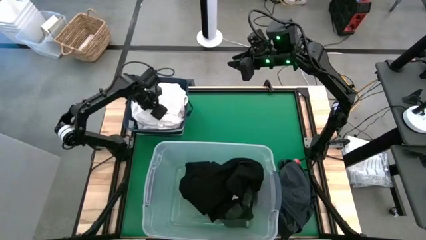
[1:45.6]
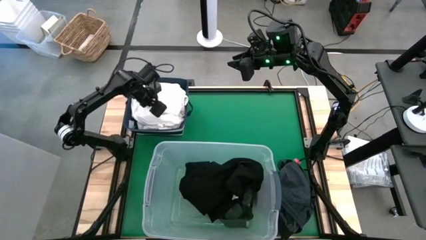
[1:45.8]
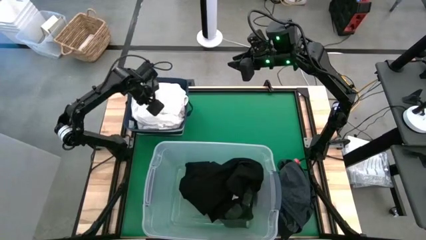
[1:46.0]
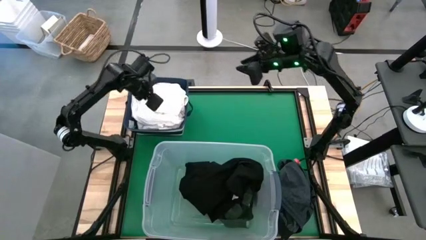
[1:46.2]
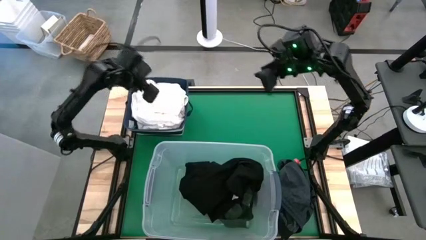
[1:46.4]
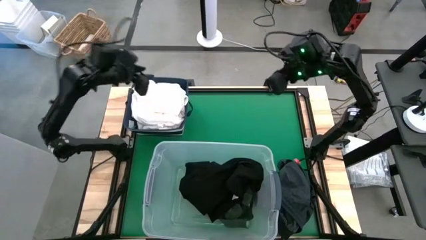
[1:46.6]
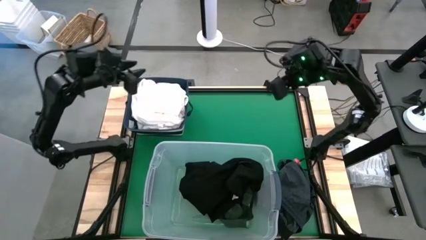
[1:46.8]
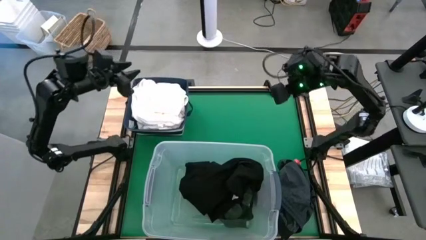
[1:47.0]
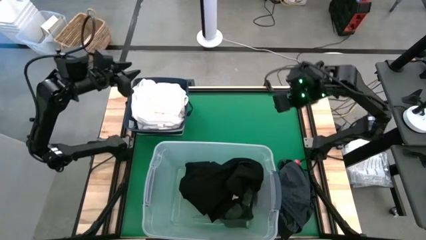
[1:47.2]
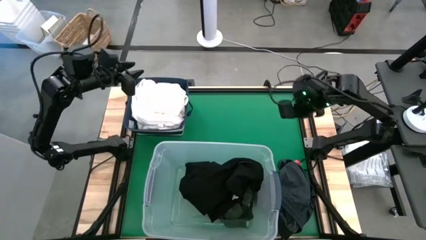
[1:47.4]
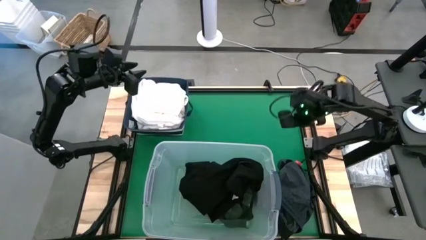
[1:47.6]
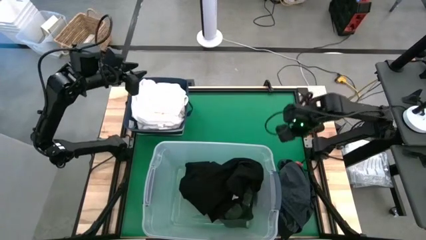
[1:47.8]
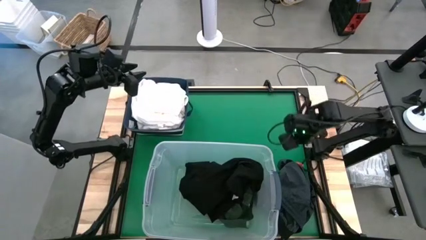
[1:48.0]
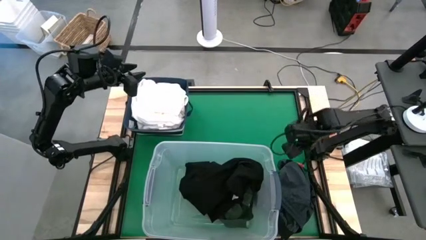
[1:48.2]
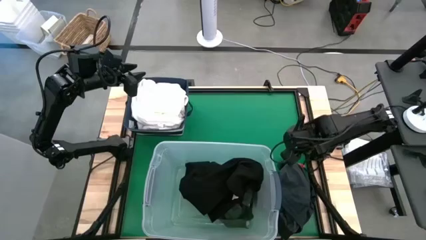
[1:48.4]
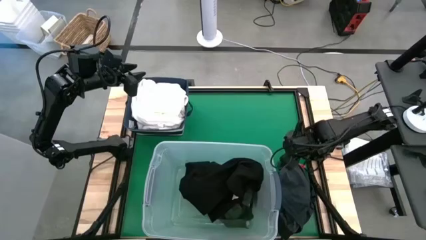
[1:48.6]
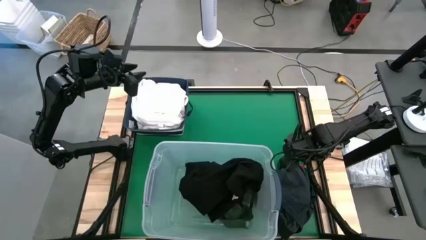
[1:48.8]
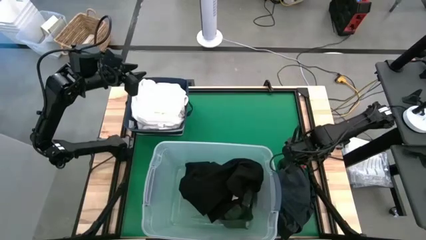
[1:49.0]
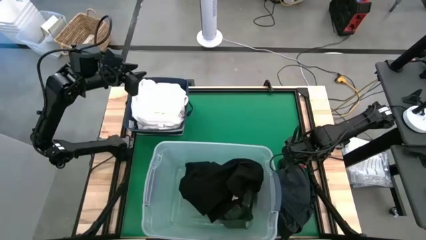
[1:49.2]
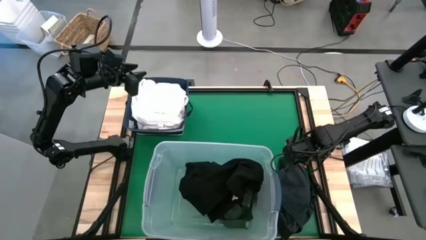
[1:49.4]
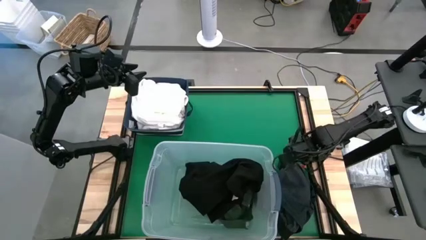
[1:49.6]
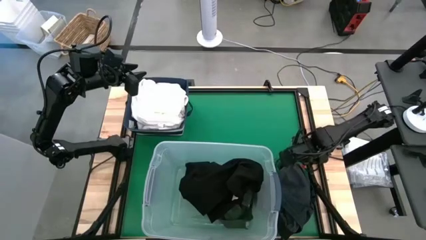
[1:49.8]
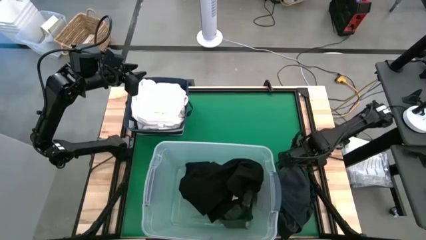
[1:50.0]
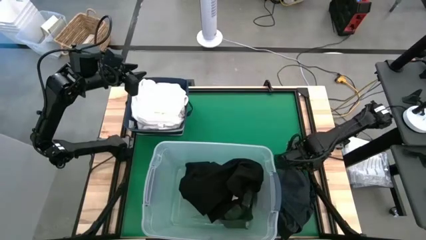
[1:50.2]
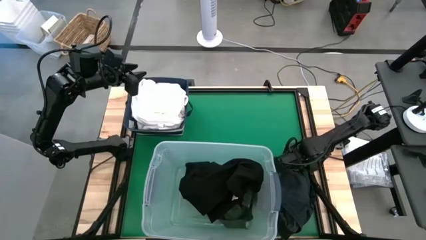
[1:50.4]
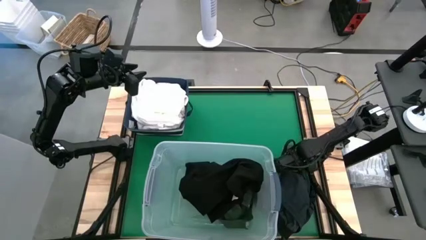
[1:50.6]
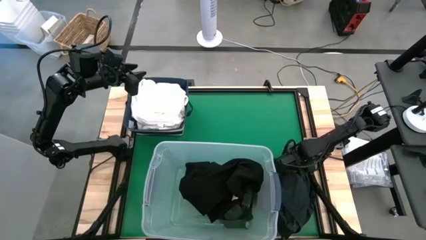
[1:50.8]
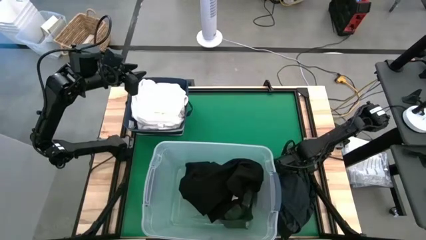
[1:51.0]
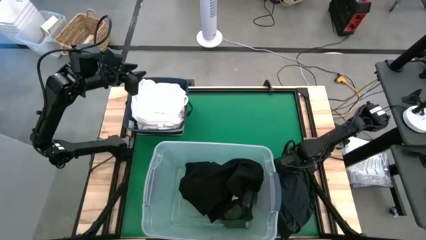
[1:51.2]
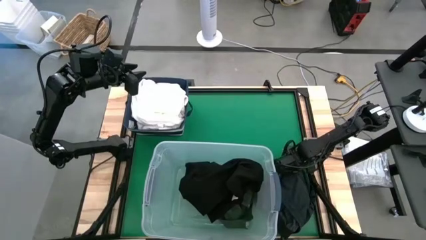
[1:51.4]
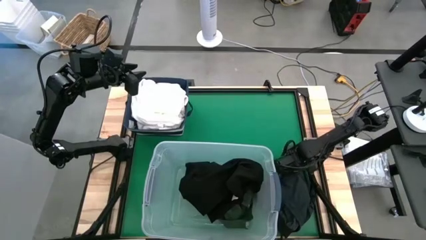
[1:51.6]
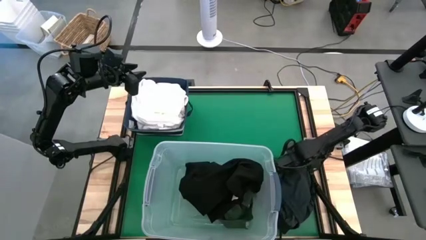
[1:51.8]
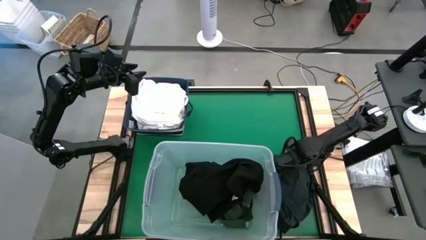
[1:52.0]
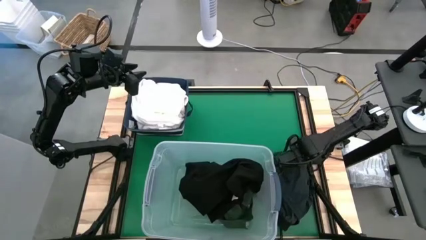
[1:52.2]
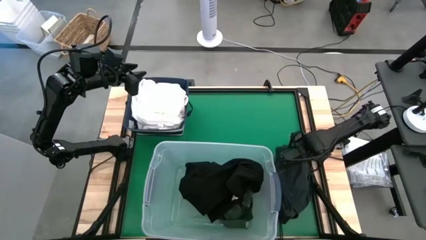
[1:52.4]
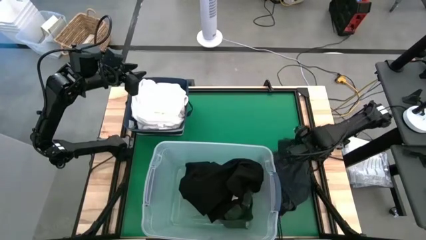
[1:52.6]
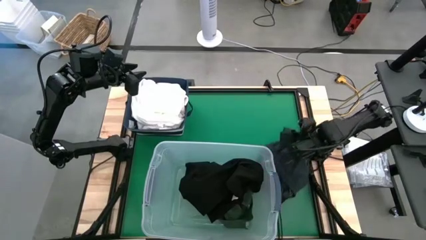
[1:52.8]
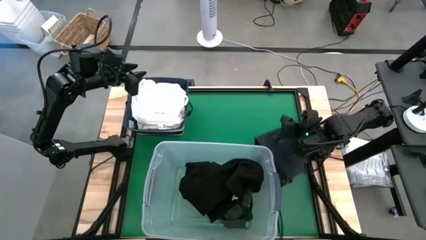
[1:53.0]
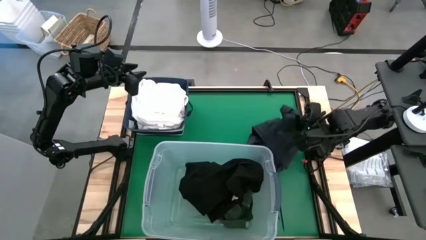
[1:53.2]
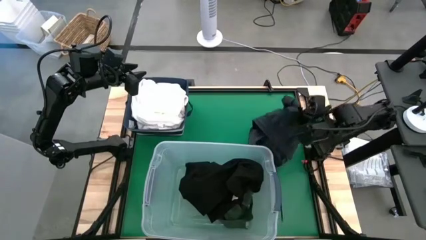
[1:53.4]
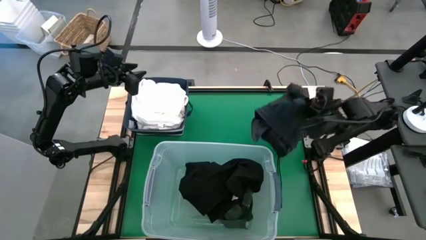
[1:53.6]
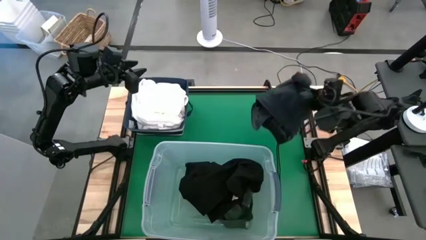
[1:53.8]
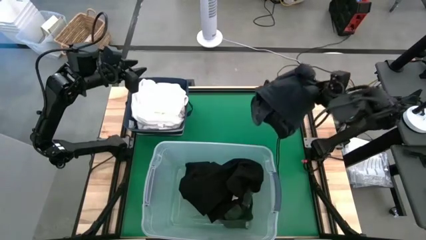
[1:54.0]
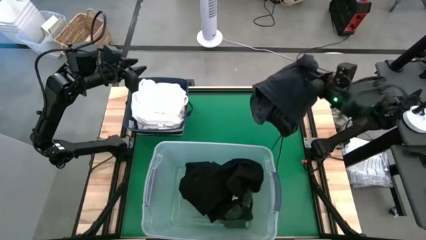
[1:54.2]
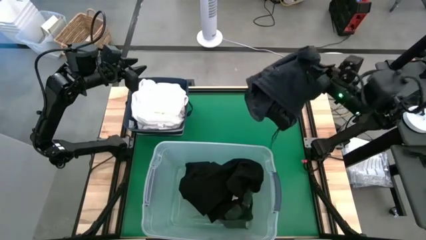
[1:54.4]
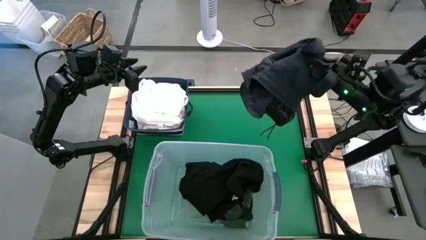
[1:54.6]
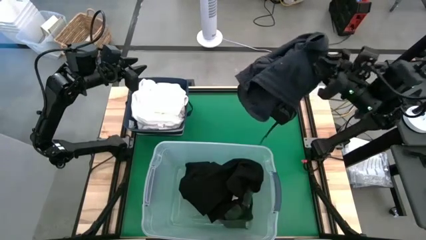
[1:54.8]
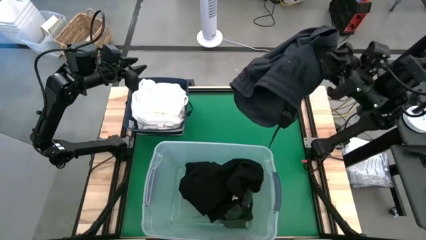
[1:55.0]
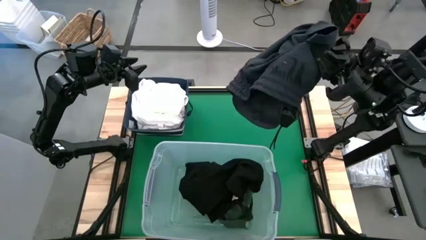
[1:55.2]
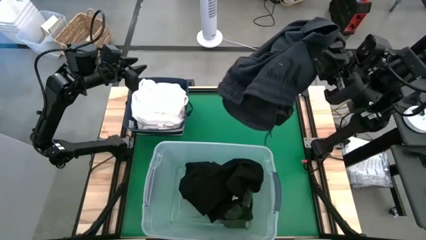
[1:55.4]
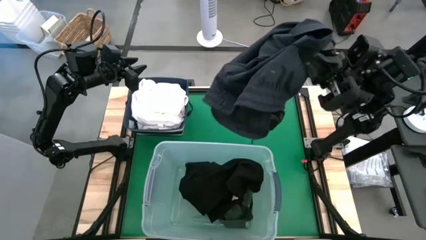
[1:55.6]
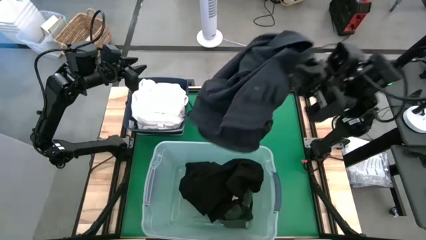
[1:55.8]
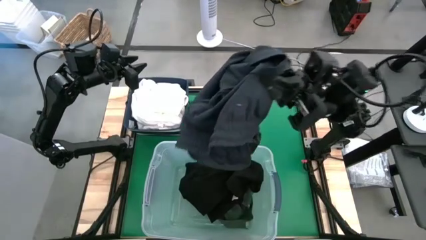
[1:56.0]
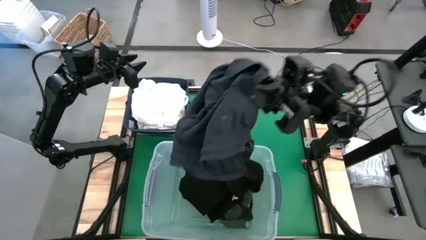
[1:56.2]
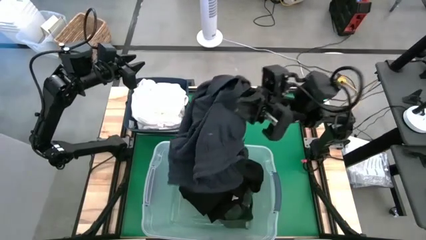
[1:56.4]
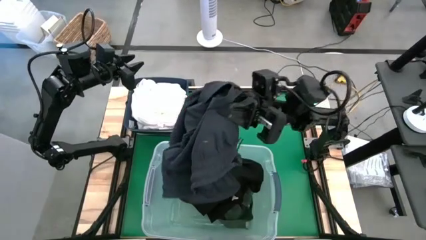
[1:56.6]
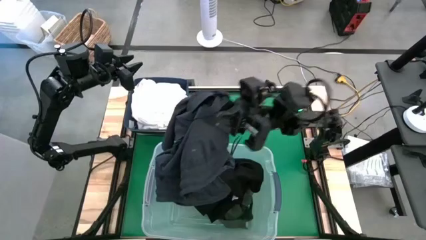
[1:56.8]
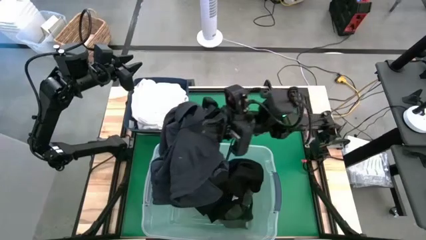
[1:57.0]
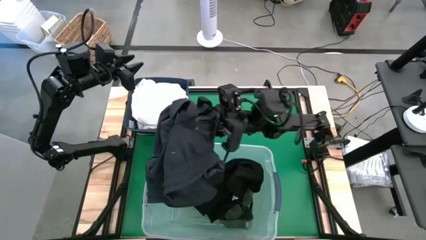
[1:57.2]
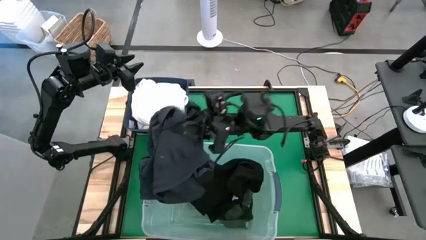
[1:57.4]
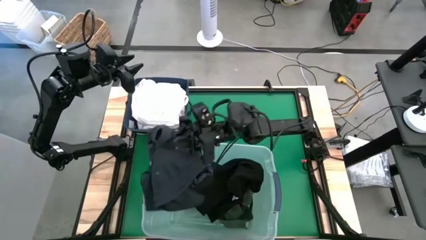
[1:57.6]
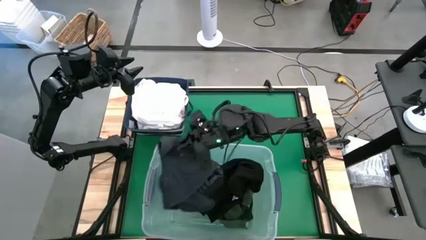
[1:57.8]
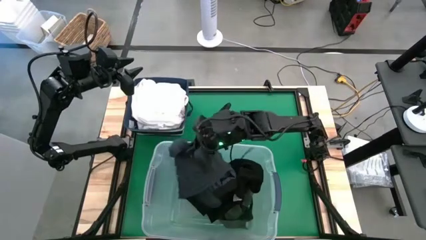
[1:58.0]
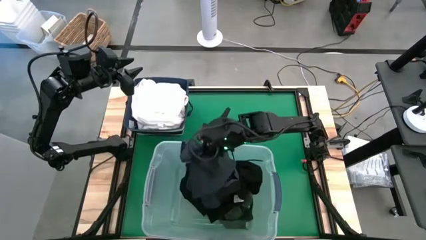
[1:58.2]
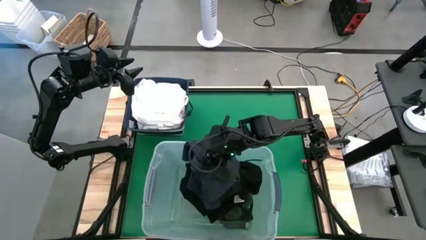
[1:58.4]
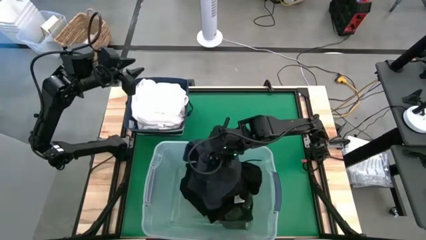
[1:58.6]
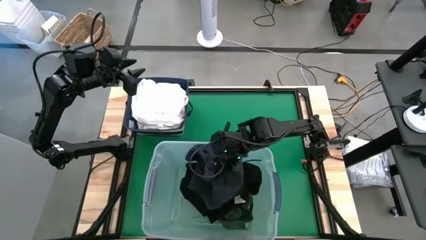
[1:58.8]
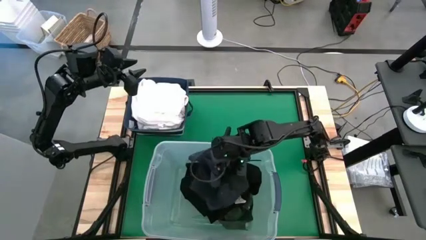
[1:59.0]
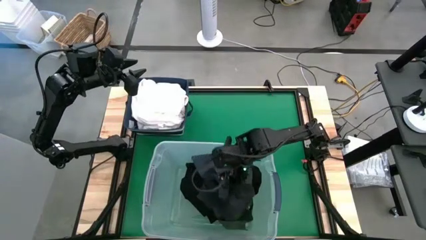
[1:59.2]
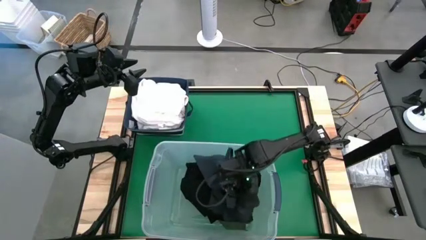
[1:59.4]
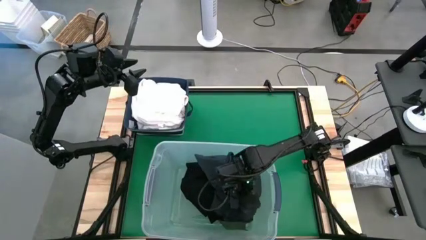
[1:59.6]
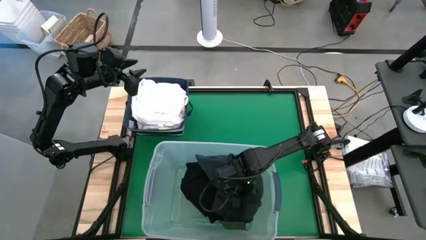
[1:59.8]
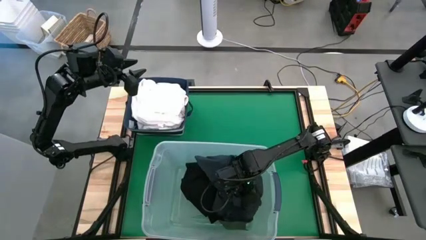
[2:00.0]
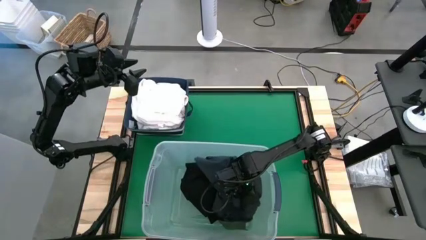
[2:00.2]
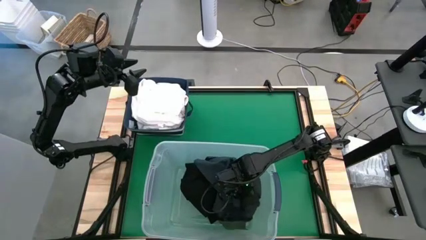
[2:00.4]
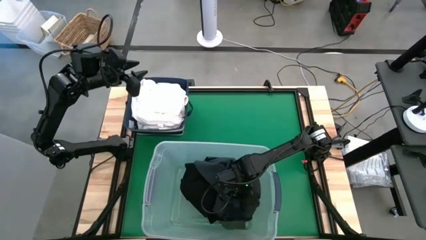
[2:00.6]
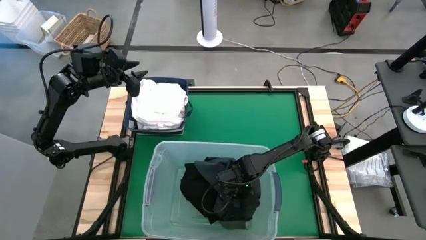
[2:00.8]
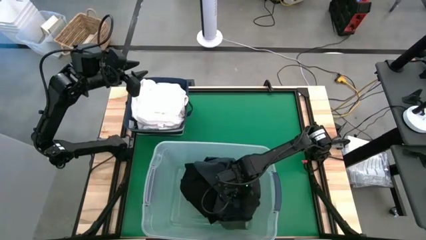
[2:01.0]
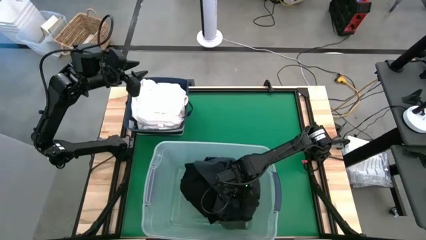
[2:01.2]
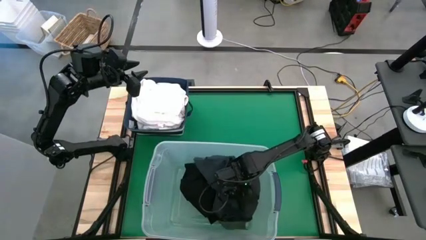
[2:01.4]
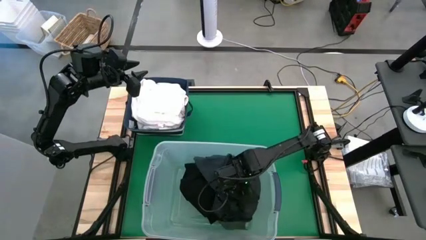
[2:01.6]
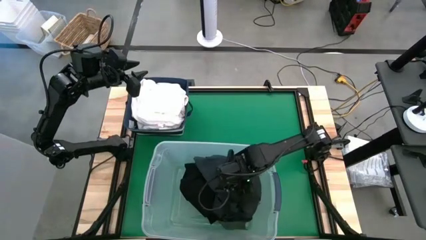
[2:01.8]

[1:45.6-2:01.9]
Put the black shorts into the transparent laundry bin
